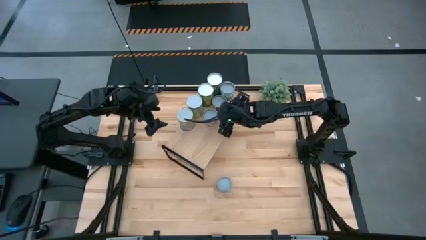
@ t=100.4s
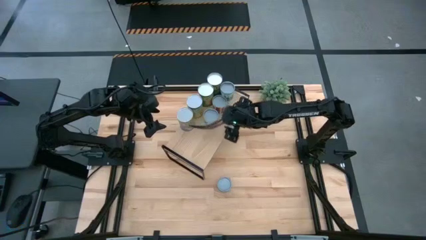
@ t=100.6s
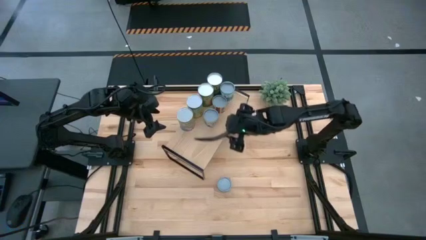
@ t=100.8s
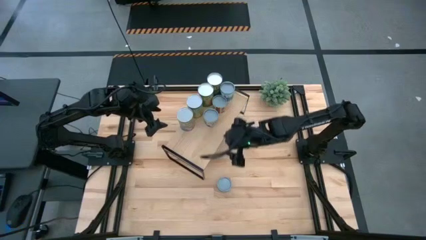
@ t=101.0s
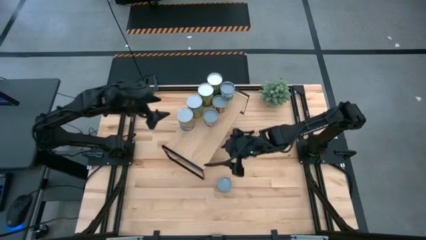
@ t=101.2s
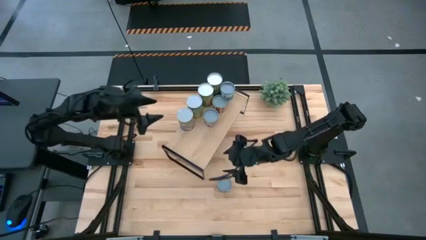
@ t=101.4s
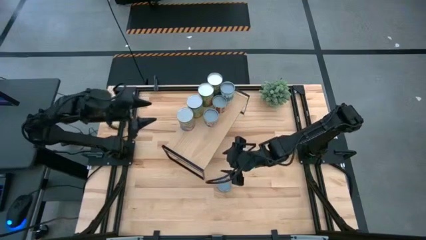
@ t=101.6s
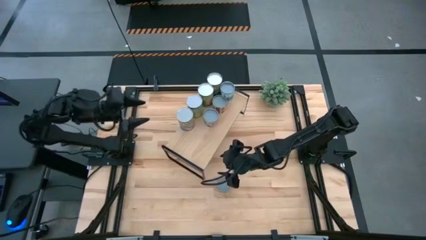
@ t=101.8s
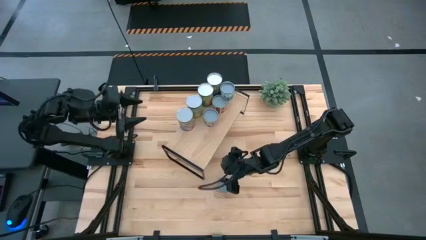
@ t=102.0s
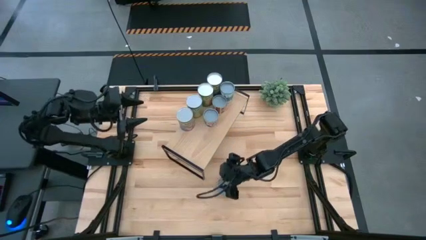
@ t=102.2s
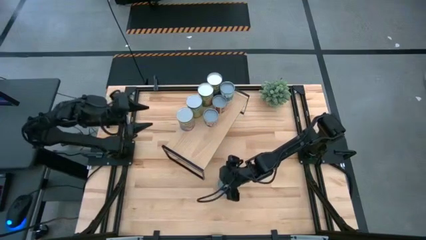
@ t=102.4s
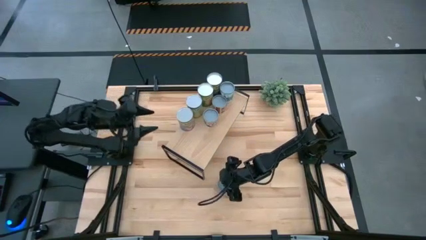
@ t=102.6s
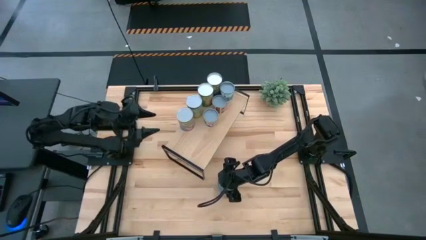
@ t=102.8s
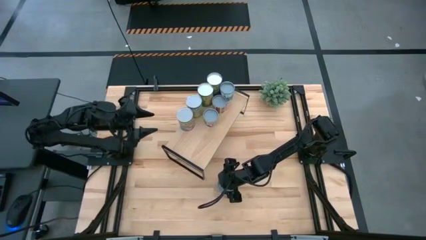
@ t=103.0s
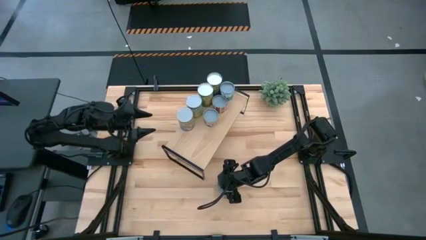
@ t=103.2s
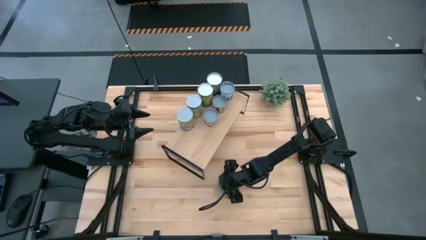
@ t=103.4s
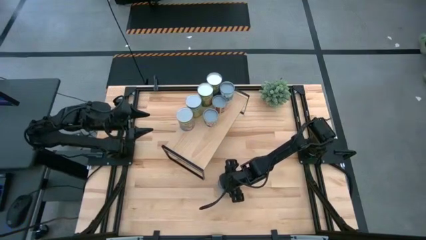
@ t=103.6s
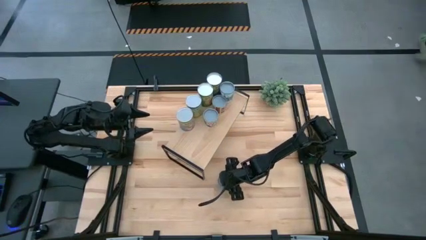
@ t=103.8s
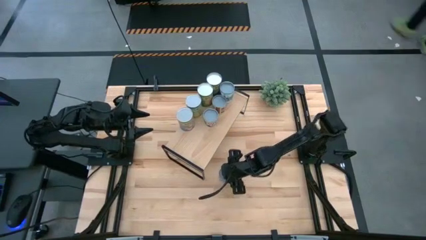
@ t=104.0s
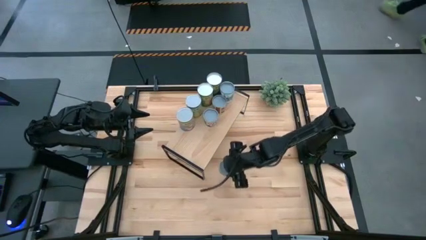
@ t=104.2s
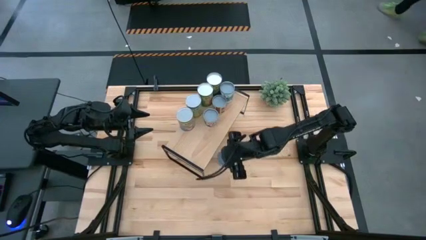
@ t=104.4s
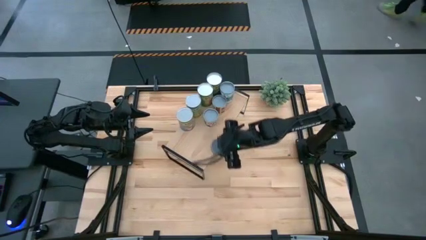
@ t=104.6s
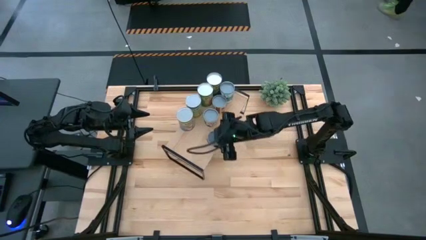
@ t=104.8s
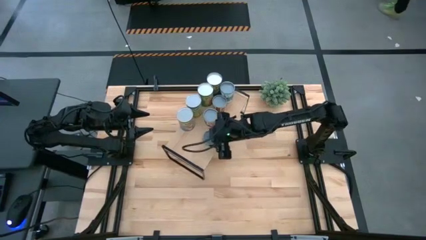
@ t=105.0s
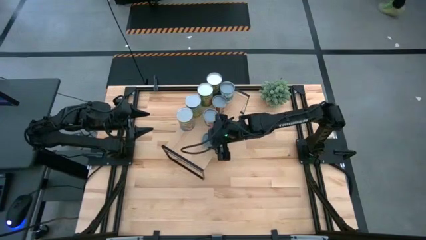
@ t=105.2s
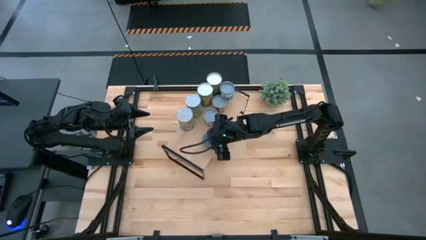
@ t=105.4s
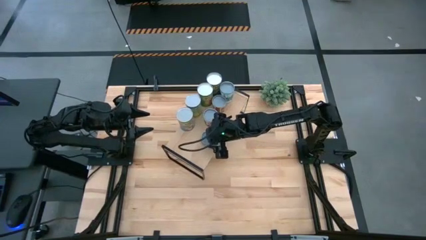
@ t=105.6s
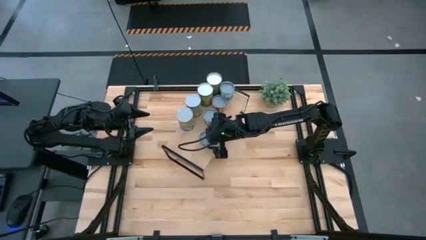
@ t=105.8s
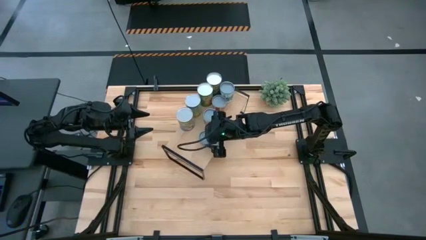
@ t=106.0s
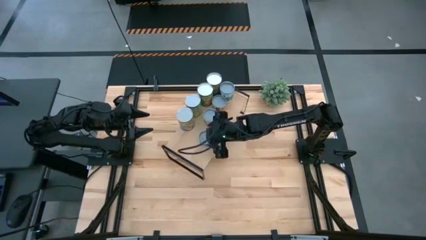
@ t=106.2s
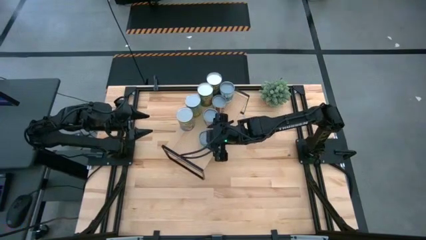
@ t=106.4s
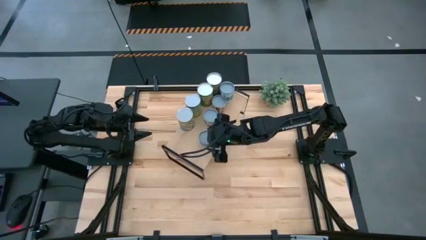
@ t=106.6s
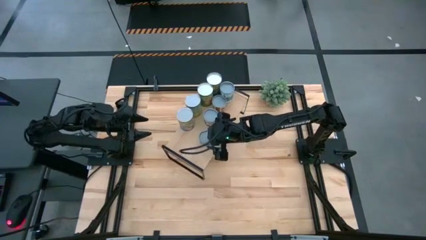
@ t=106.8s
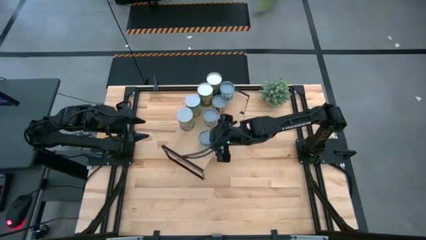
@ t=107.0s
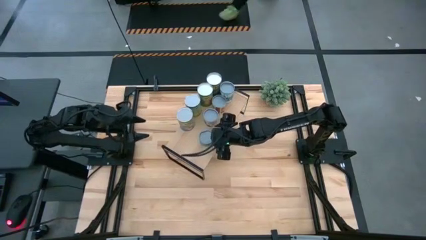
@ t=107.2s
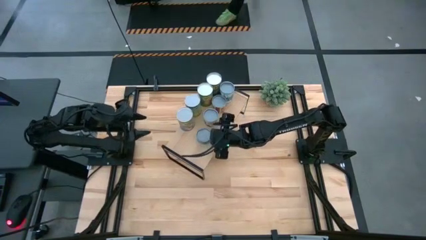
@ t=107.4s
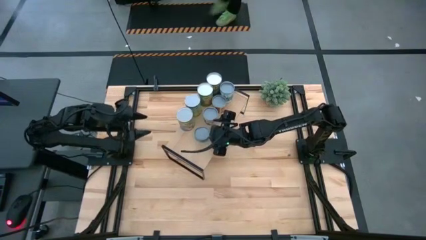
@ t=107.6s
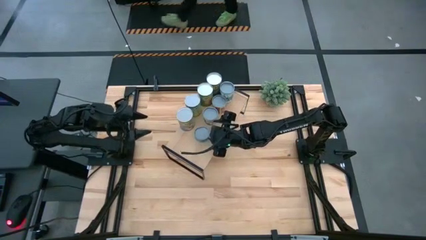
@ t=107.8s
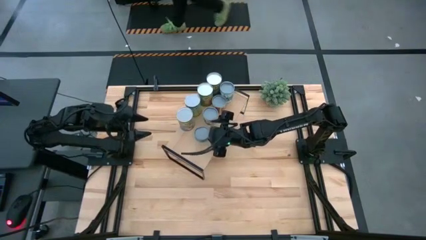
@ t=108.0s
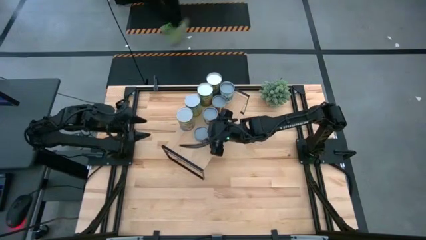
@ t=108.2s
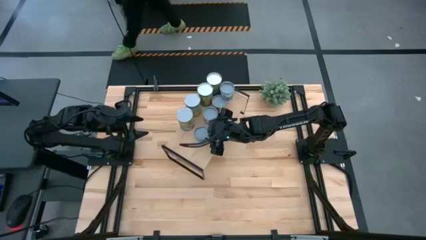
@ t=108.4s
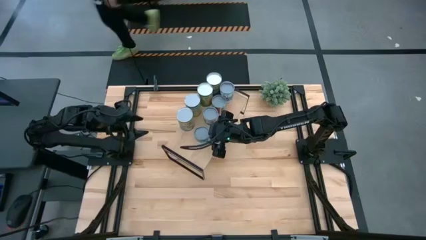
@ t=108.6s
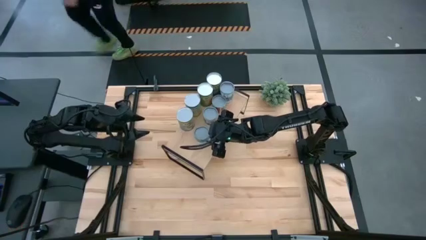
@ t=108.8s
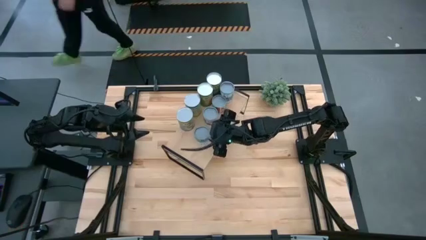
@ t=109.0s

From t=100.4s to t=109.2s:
Task: Pick and place cans onto a shelf
Put the green tuna can on the shelf

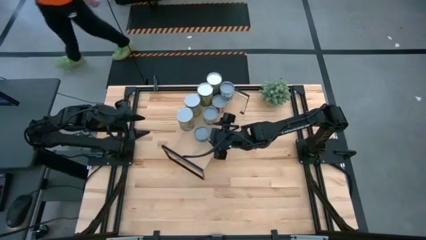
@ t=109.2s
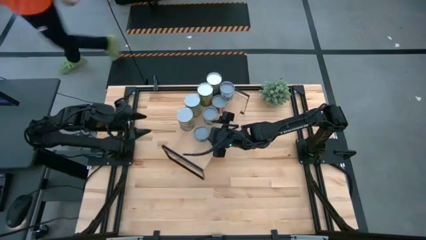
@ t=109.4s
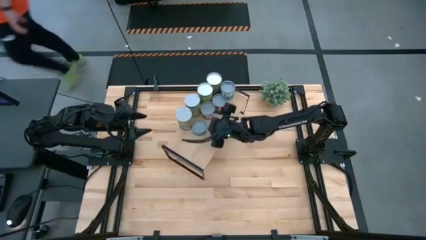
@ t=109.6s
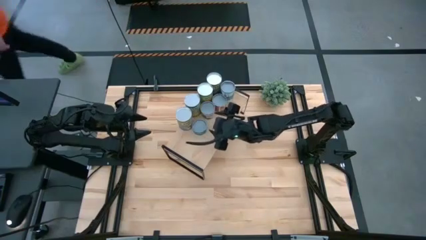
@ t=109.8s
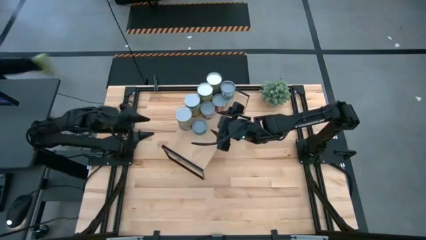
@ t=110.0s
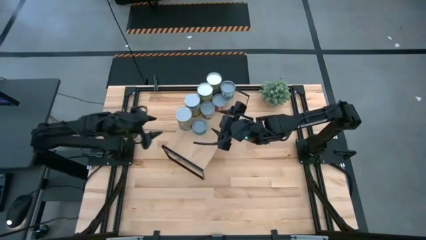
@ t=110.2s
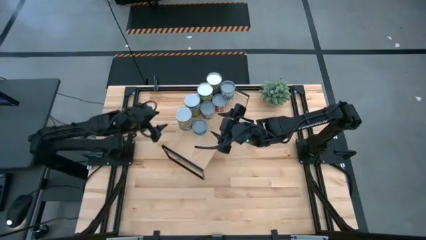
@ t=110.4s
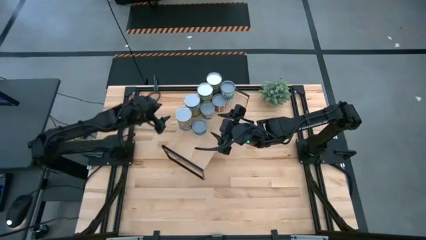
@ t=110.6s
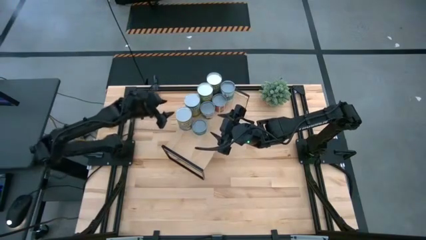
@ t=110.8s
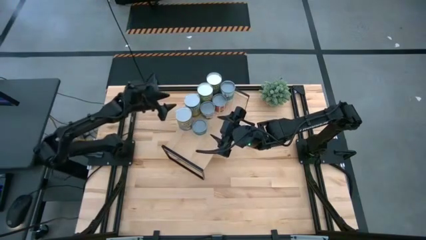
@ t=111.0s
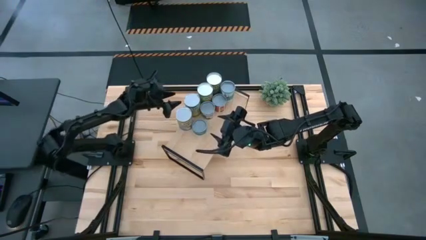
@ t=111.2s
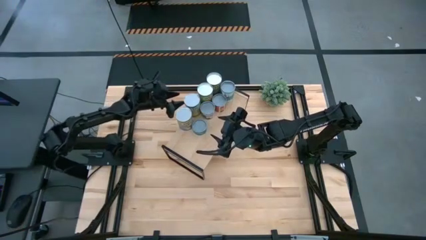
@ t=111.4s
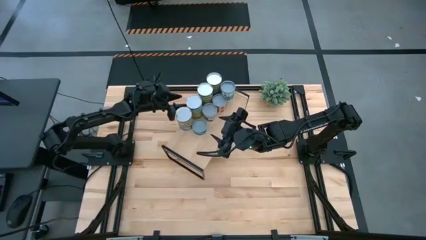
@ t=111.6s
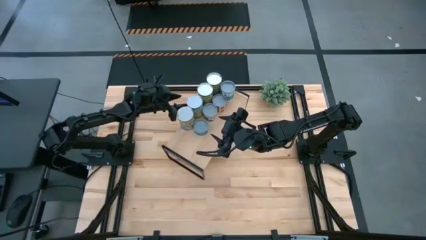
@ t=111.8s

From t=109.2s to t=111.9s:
Adjust the canned carrots
